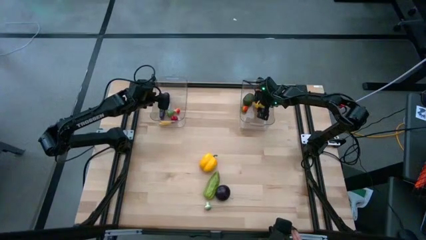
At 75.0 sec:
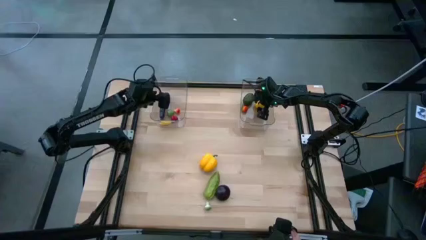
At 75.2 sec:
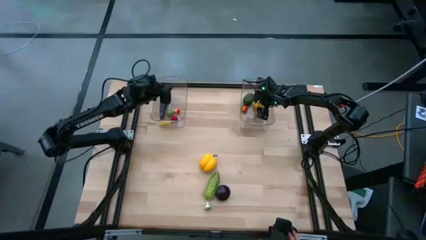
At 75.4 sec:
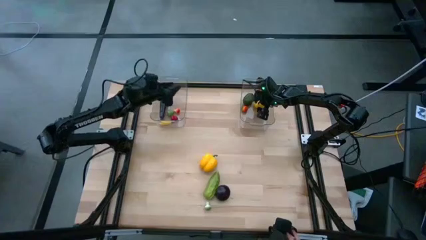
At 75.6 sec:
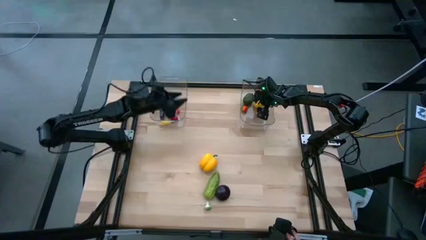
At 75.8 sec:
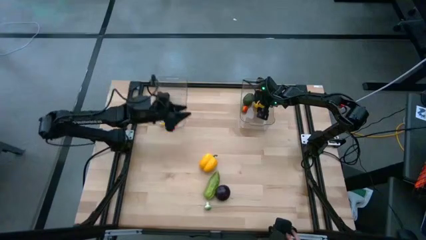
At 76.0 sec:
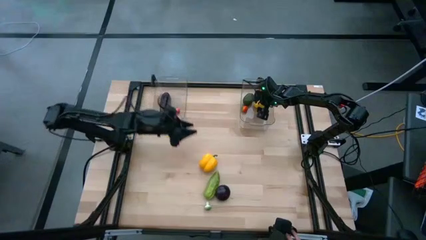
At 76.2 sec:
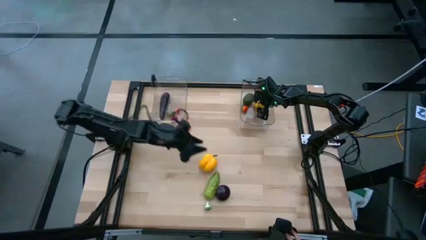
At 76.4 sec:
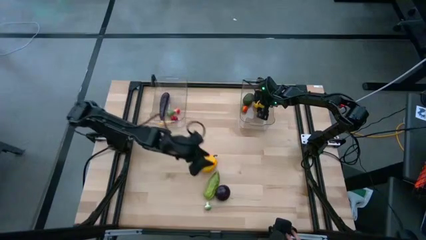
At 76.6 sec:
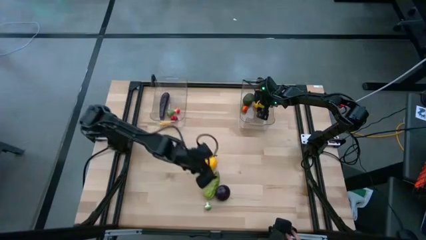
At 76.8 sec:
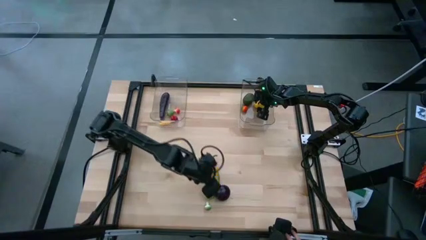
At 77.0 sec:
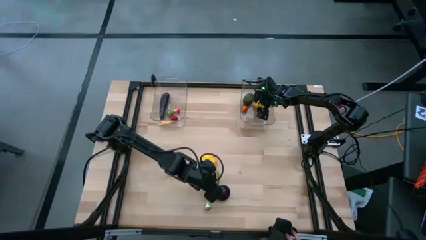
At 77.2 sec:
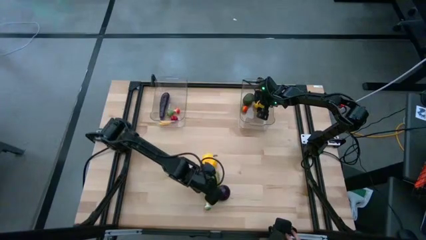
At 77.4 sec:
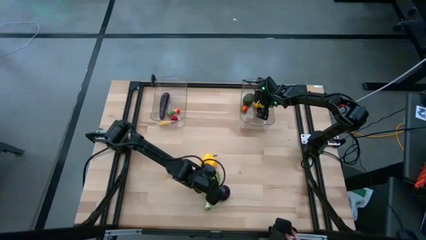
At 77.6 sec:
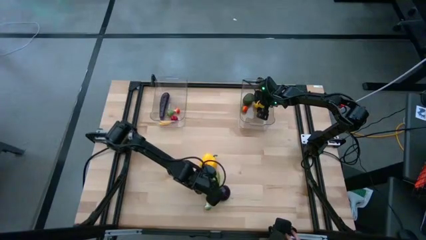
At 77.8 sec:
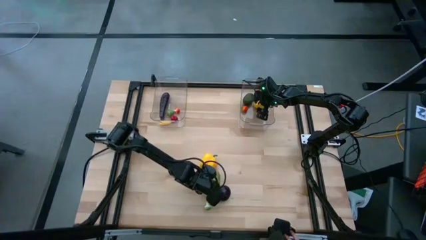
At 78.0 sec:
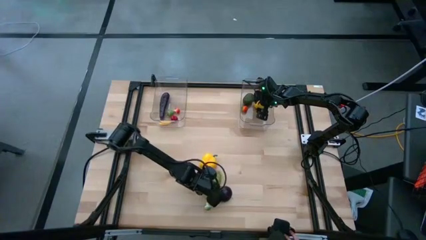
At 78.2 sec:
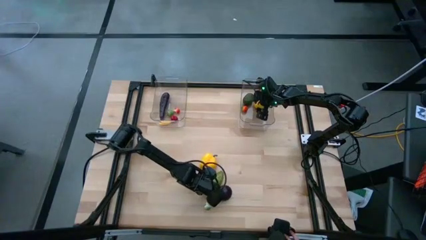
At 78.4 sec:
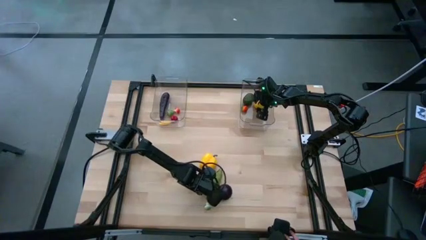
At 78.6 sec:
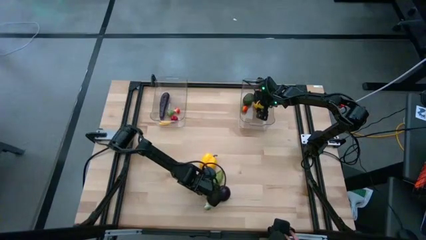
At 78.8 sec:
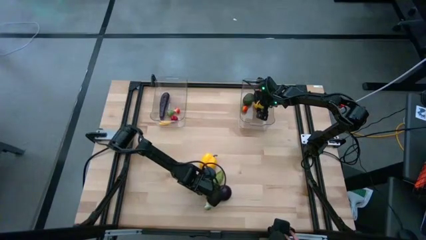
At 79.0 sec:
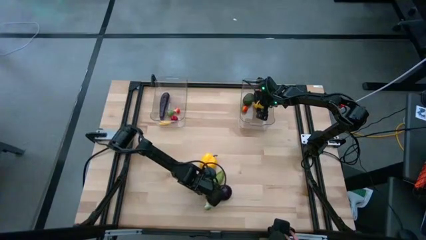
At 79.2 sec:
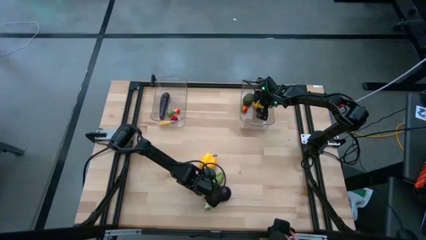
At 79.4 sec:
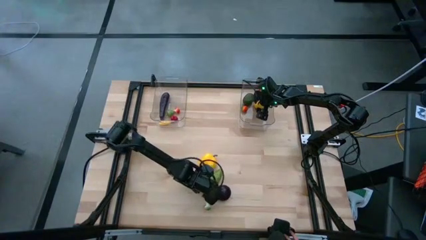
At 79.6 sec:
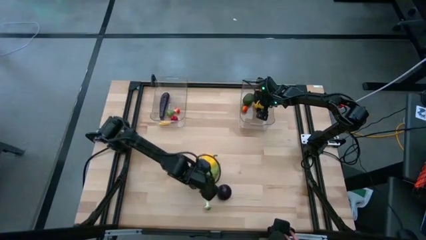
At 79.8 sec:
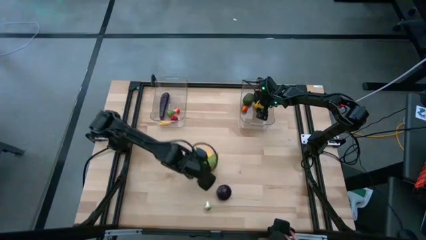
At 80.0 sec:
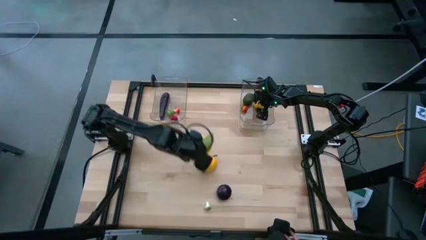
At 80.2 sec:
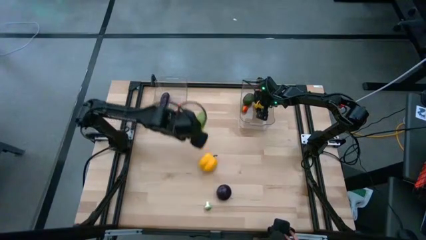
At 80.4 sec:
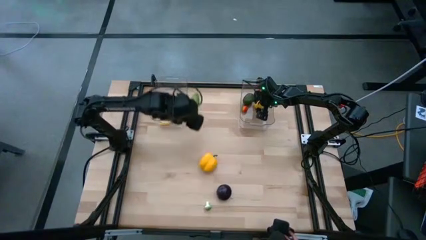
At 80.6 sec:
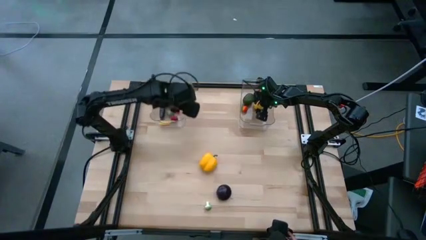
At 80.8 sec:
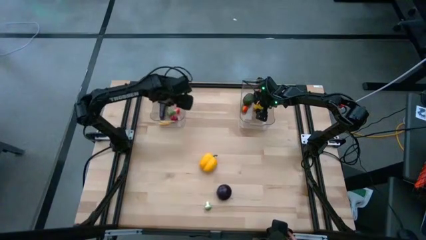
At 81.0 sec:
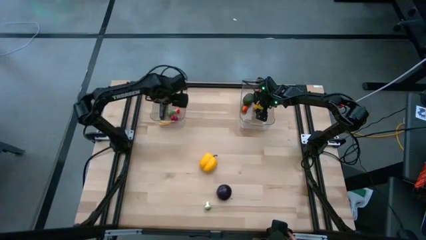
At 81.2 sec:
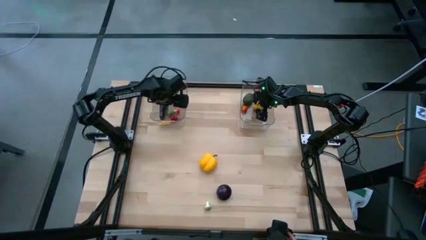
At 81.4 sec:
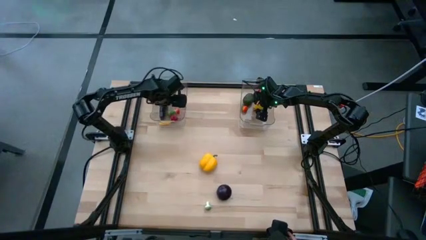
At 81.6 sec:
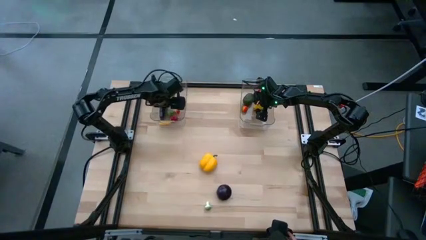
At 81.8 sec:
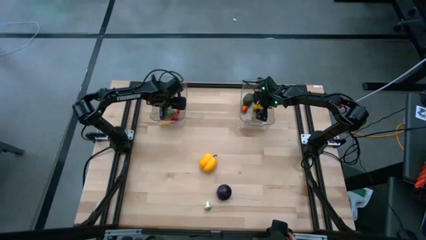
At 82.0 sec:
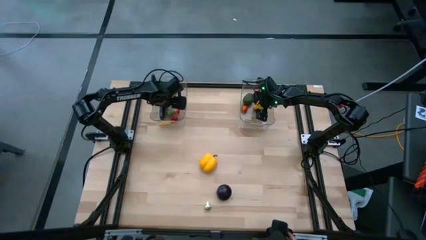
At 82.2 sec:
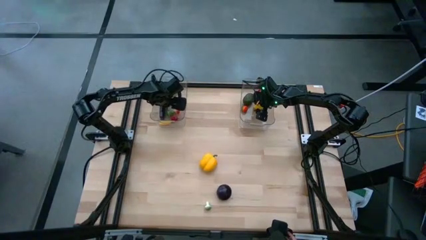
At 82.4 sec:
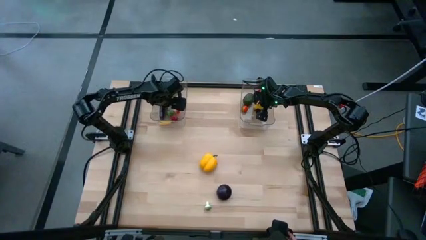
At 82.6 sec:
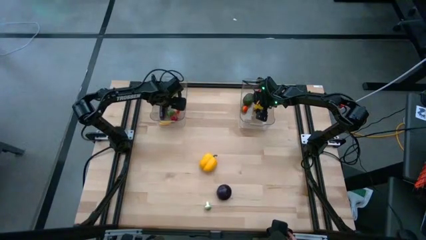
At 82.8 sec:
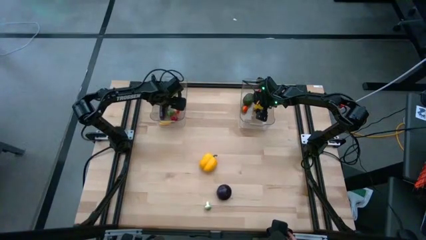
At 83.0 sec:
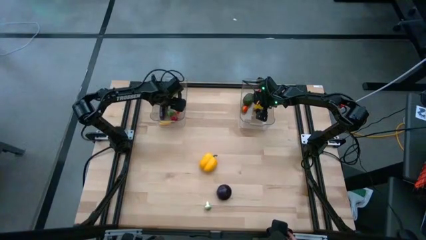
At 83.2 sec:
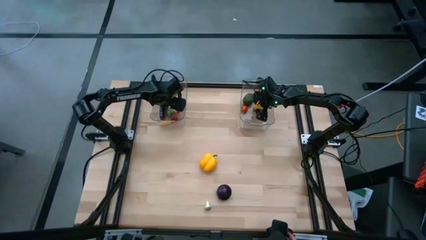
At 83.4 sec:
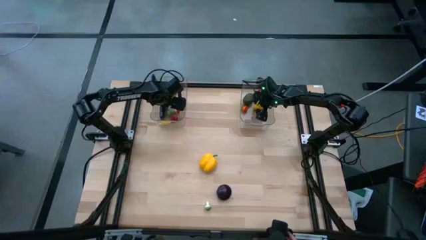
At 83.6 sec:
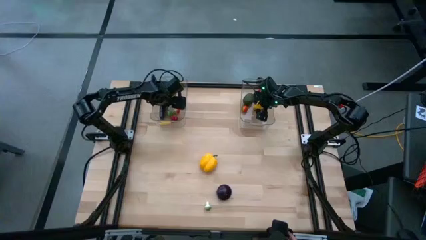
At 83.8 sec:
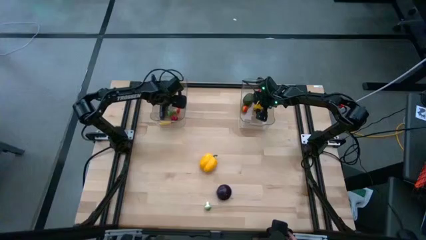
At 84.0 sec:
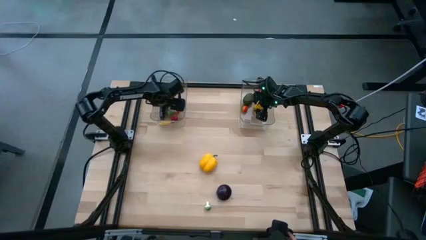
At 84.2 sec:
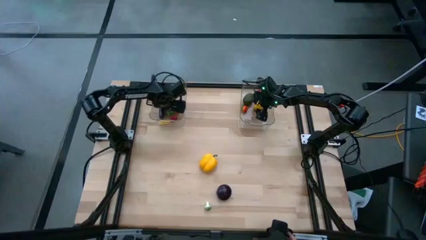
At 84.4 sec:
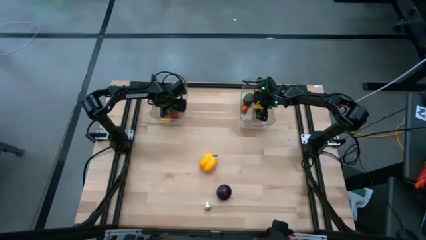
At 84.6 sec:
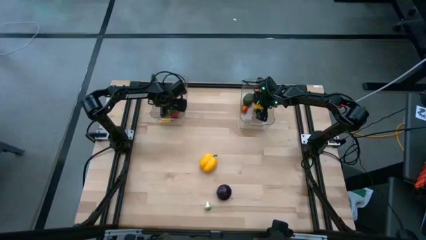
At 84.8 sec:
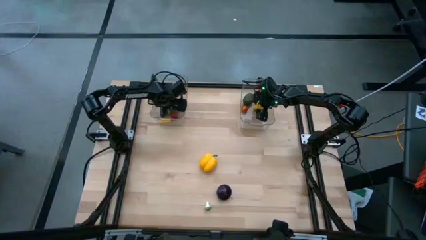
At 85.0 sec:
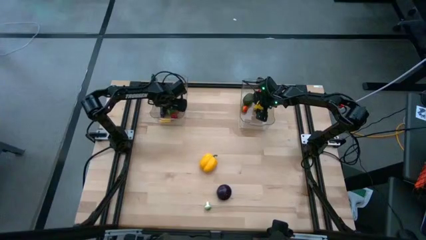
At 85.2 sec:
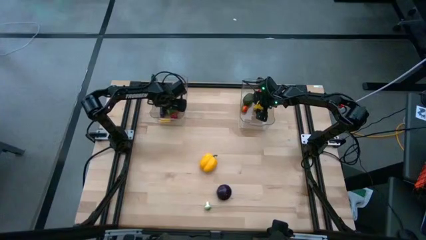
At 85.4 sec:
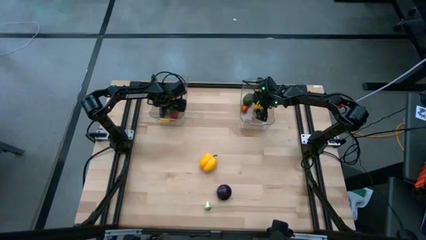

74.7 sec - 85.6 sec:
Task: Sort produce into baskets
Put the green cucumber into the left transparent bin

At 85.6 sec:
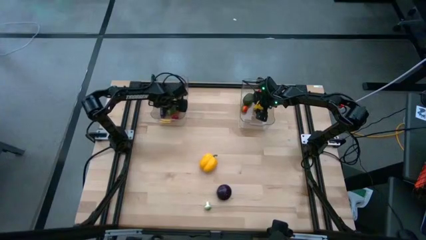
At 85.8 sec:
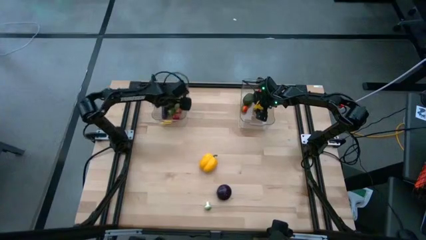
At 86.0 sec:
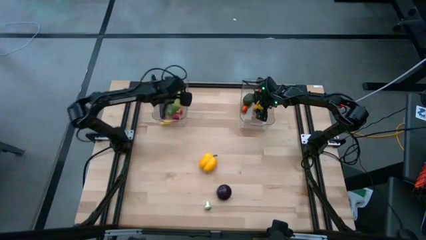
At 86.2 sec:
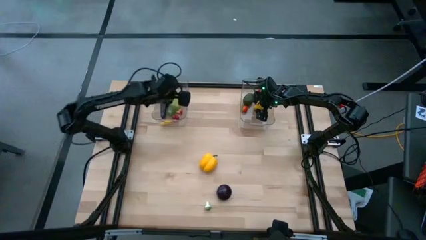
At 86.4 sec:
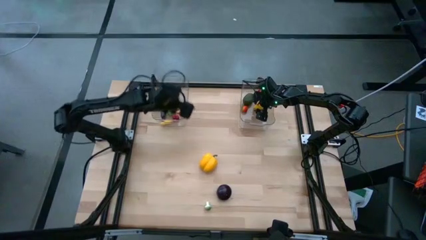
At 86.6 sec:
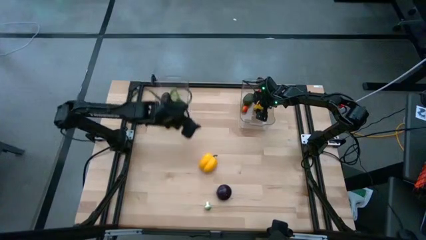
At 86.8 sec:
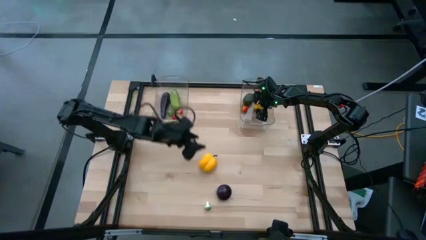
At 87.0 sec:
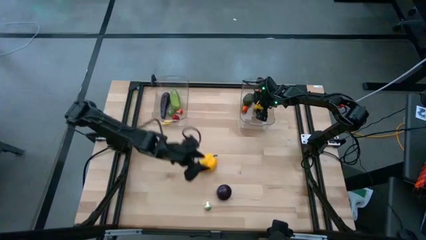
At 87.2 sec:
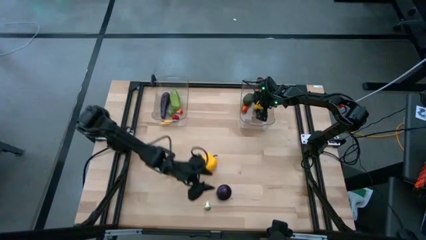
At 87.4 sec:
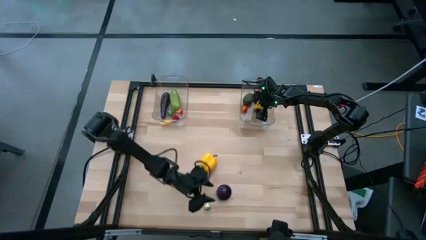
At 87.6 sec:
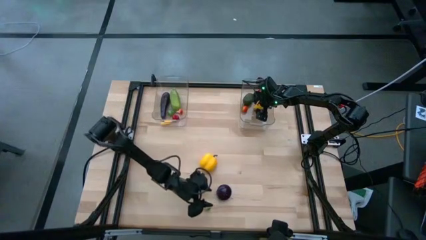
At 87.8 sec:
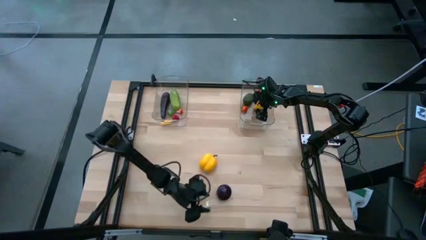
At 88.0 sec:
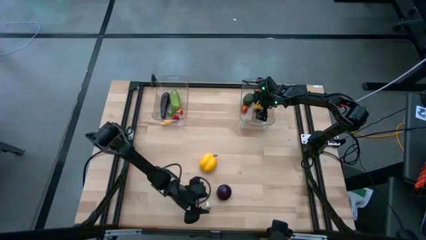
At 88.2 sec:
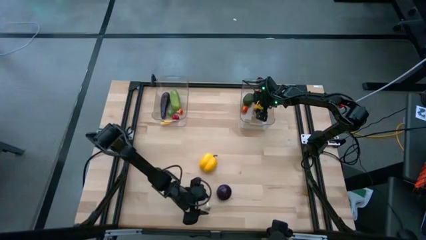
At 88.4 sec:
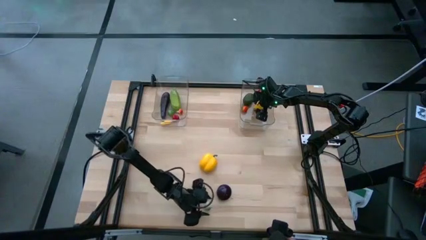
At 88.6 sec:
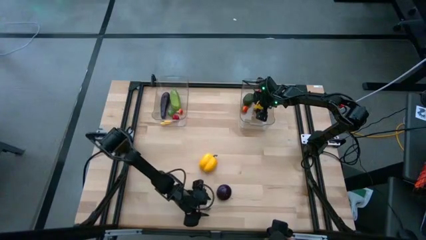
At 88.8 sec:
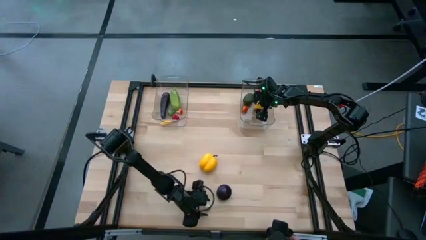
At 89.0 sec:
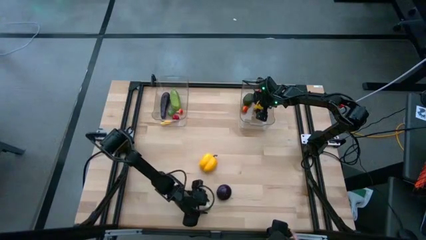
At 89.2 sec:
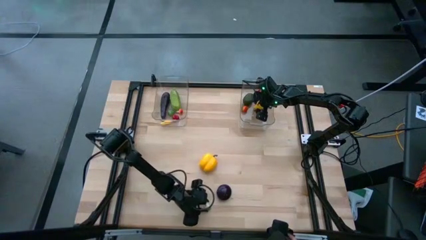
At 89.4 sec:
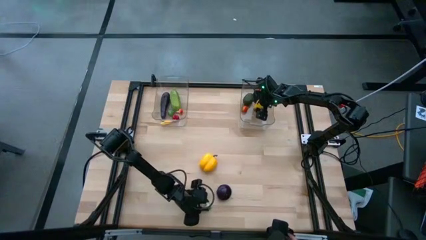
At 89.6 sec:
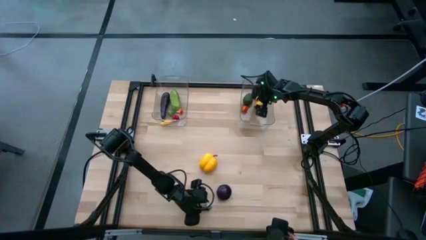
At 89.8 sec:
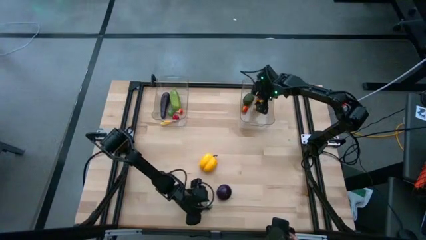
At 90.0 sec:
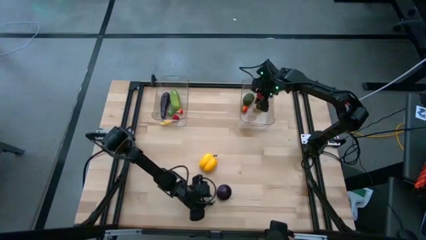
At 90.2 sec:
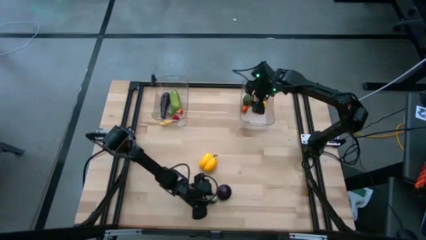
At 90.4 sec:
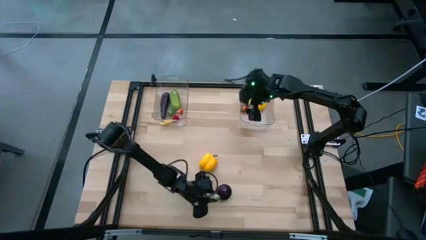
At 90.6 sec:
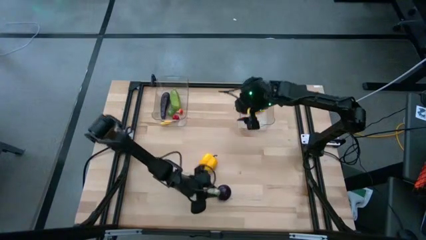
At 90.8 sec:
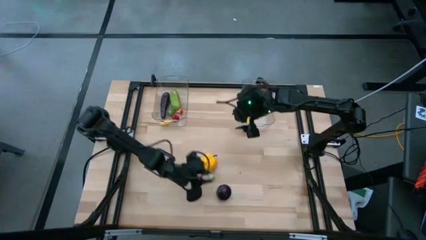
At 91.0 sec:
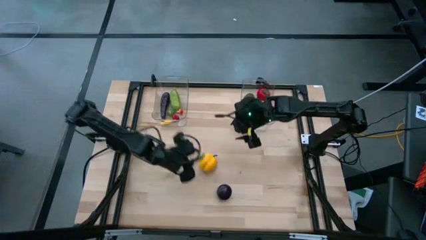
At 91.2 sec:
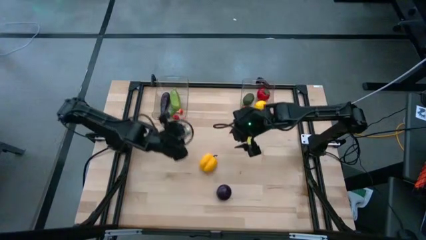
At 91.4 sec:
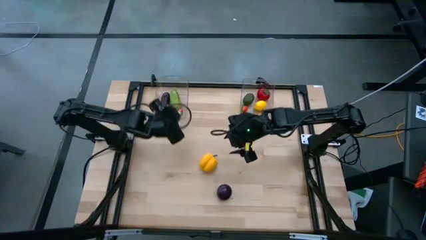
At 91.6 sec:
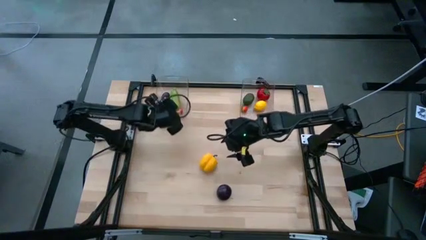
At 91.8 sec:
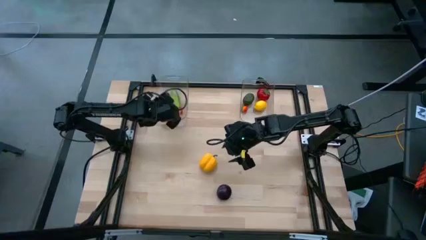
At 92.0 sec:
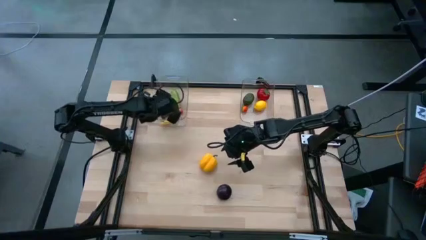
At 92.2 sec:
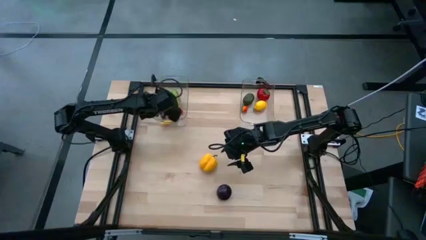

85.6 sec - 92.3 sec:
Put the green mushroom into the left transparent bin
